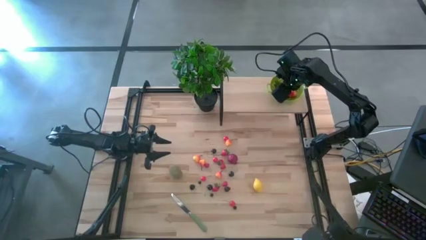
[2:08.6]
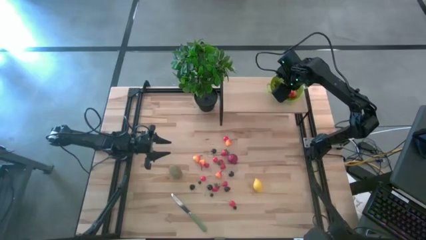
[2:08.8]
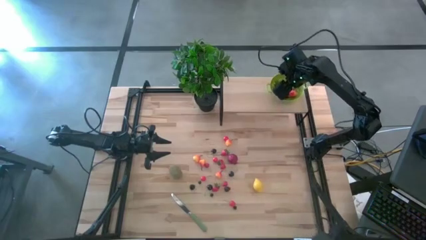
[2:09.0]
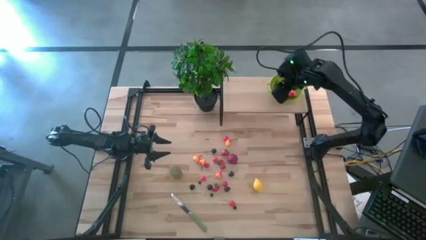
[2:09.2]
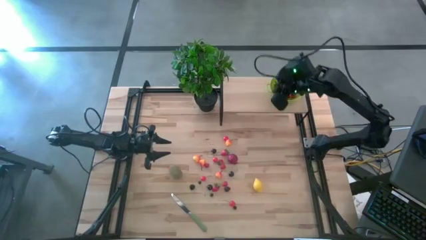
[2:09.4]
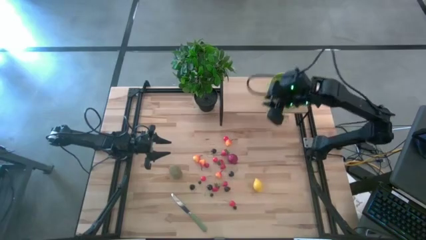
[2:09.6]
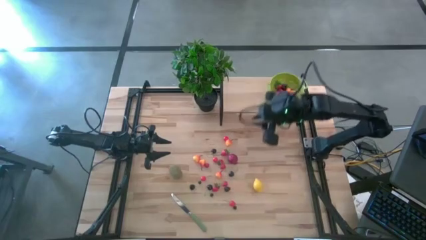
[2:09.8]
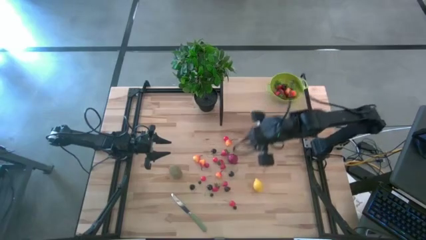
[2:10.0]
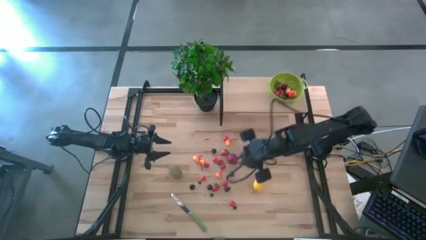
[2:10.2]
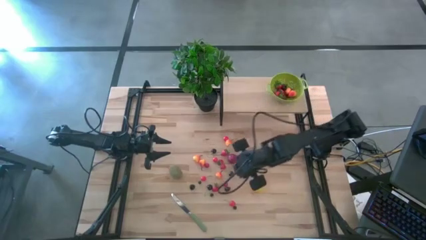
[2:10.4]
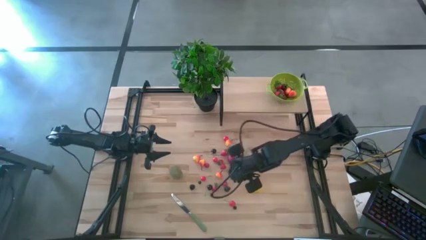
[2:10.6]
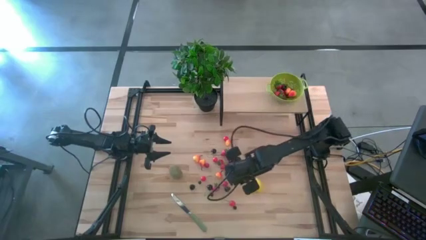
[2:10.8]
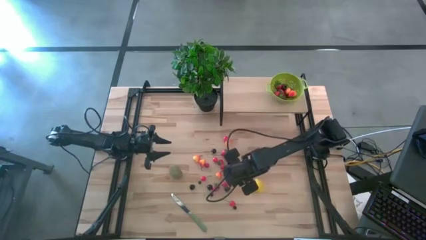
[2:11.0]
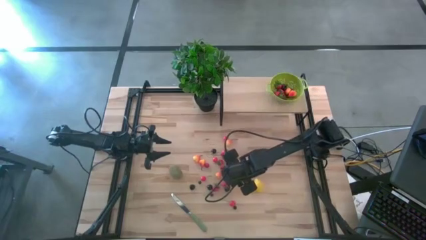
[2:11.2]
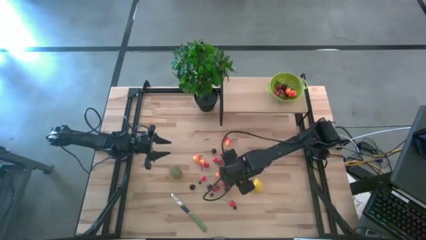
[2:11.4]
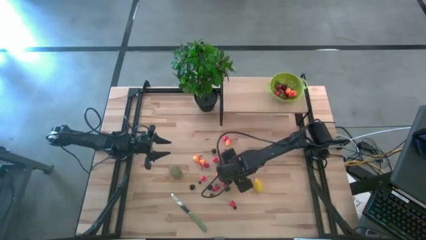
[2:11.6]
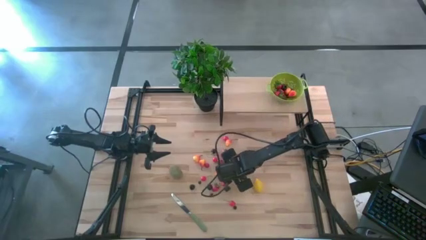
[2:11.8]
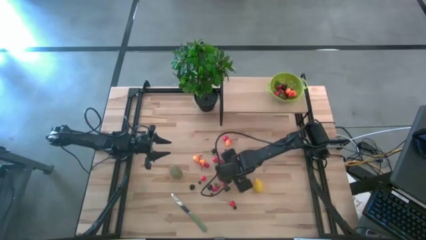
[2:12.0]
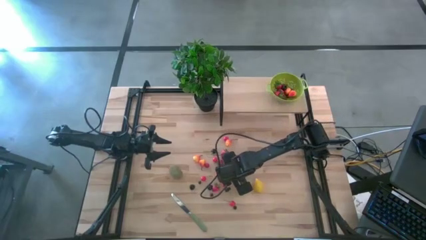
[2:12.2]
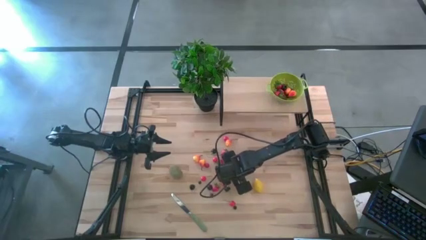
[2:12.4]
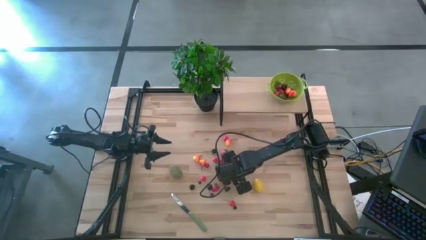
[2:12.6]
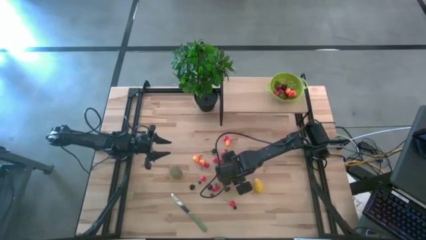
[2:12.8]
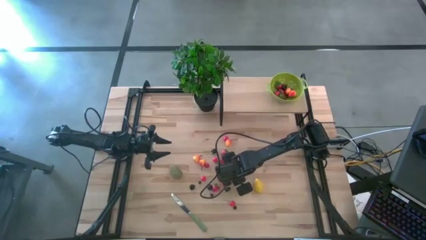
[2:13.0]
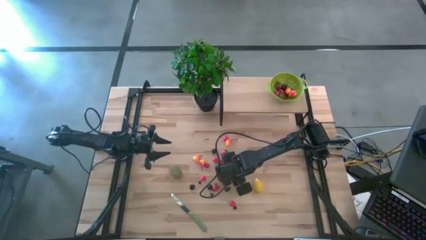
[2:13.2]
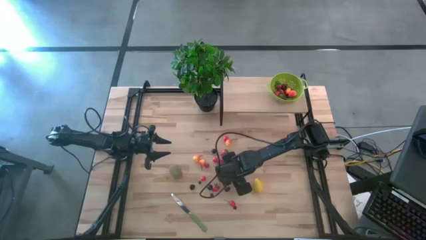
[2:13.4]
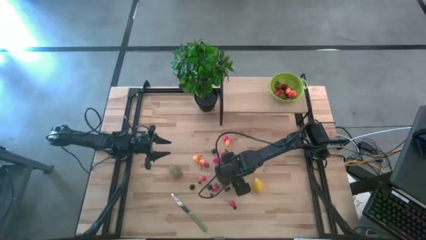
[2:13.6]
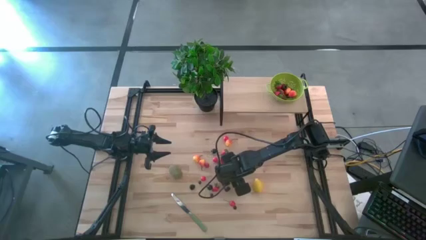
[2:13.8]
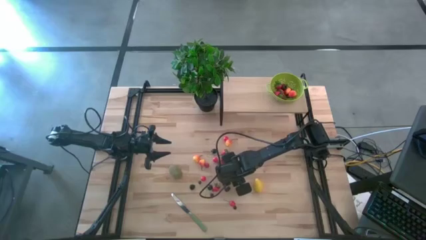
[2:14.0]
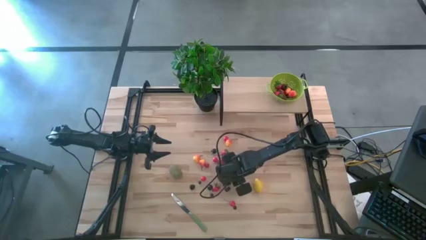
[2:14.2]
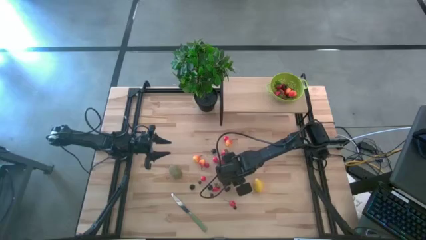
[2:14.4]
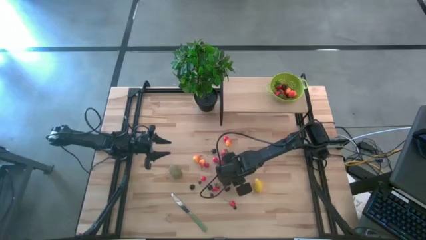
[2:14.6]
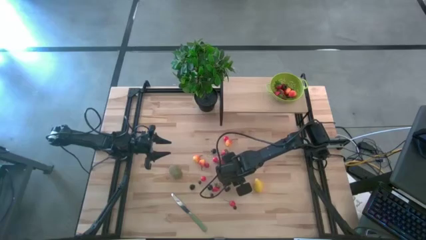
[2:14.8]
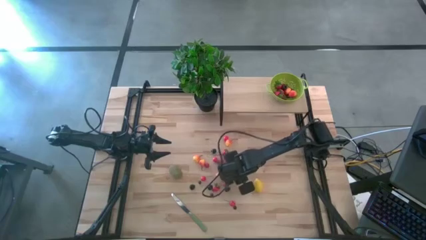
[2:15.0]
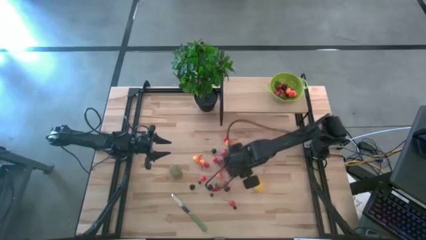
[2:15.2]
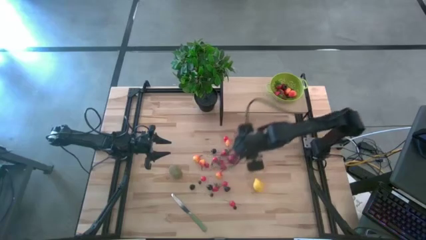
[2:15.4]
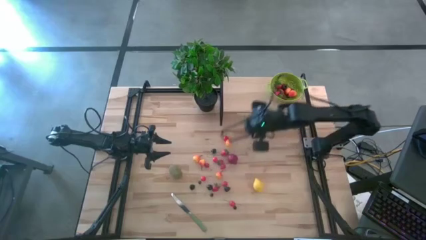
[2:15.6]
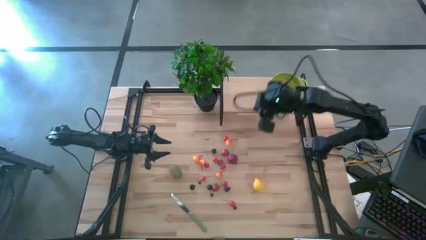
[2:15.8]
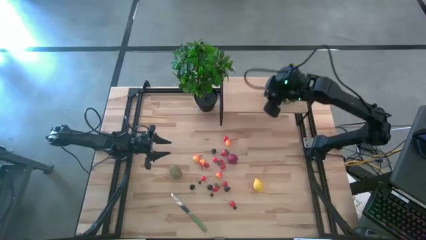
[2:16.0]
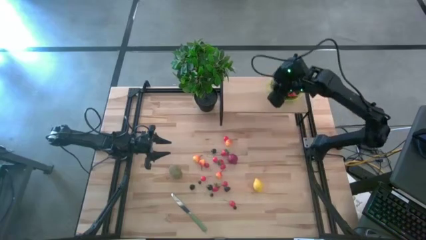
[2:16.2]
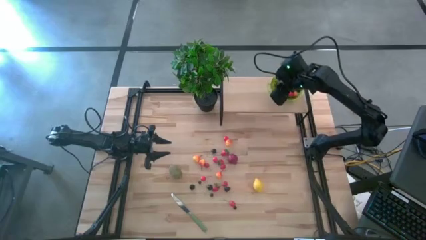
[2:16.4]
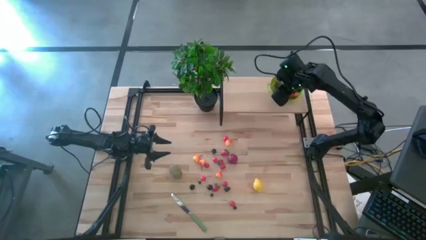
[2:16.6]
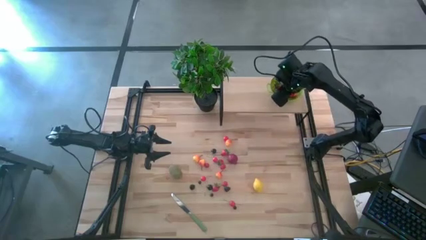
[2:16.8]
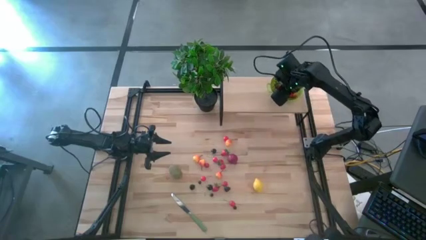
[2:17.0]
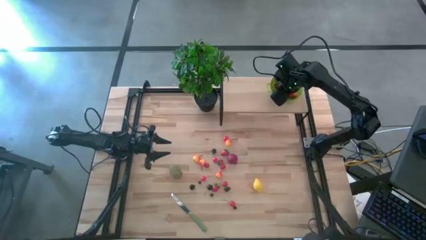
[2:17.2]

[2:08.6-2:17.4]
Task: Pick & Place Fruit
Put the black cherry into the green strainer bowl on the shelf

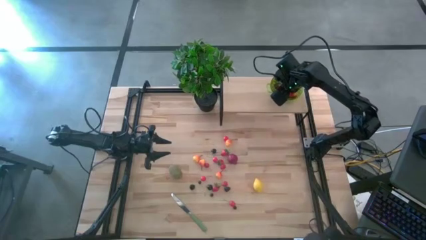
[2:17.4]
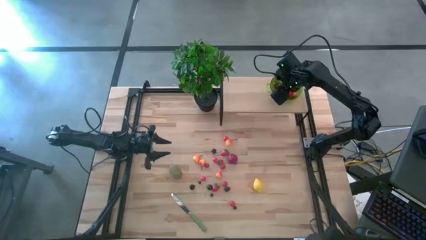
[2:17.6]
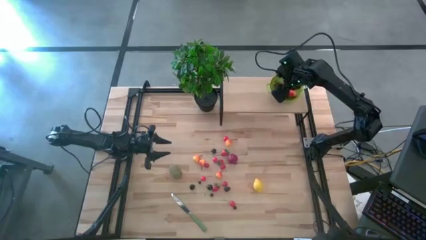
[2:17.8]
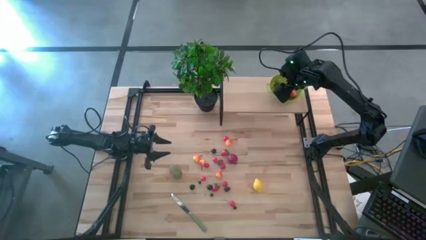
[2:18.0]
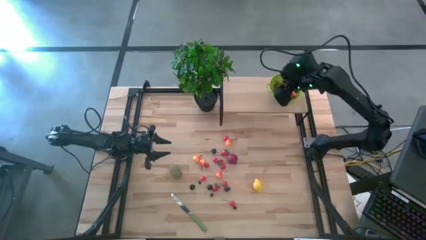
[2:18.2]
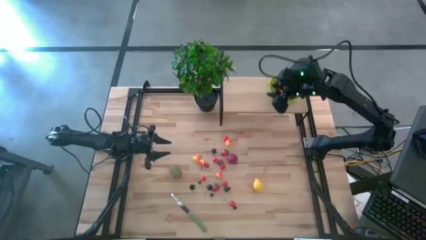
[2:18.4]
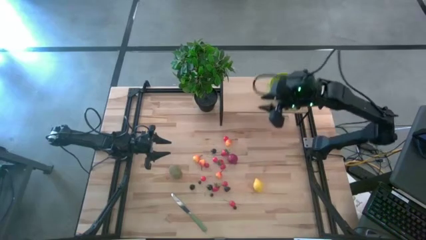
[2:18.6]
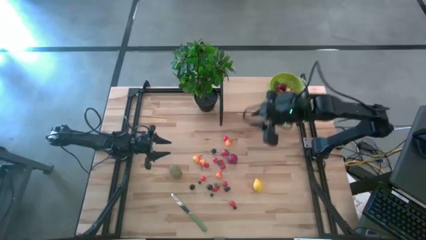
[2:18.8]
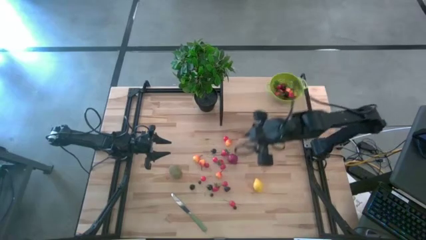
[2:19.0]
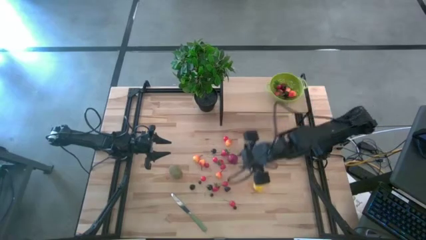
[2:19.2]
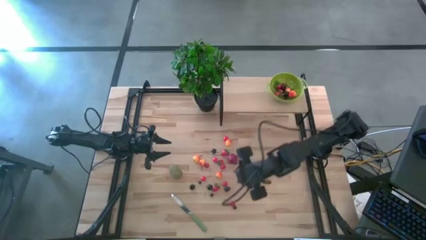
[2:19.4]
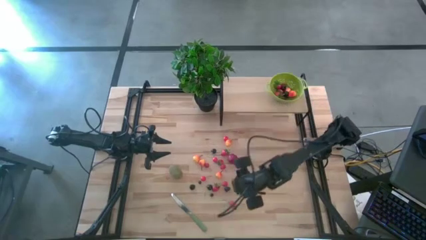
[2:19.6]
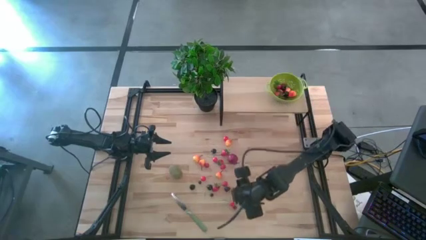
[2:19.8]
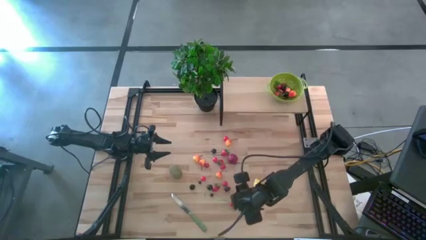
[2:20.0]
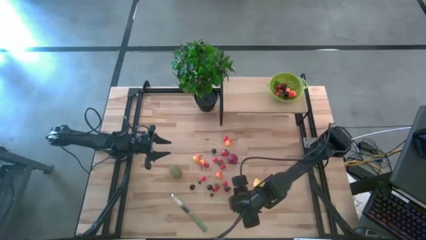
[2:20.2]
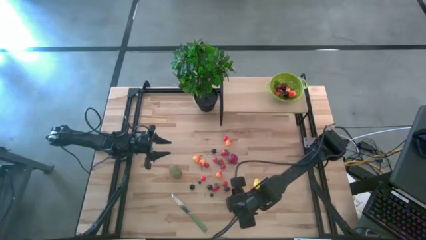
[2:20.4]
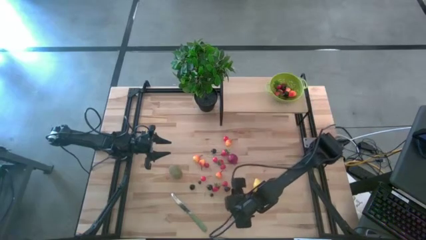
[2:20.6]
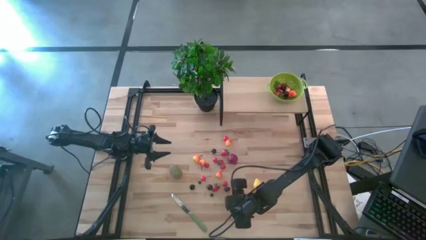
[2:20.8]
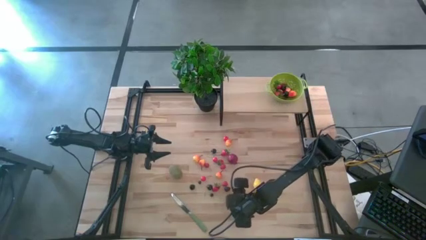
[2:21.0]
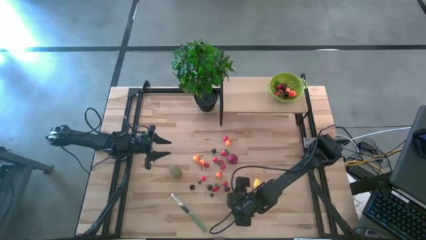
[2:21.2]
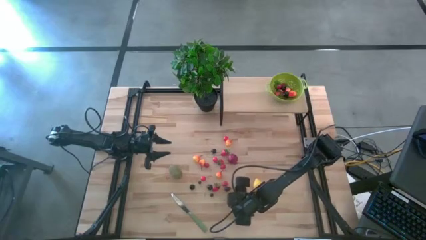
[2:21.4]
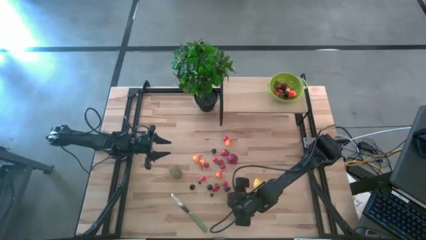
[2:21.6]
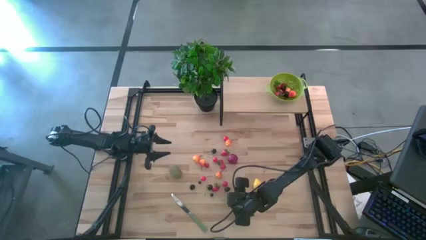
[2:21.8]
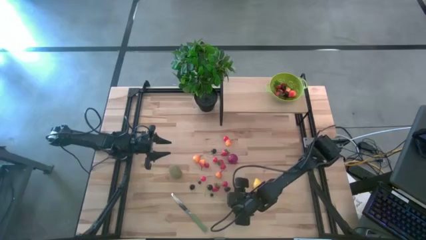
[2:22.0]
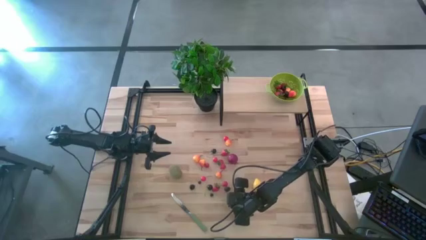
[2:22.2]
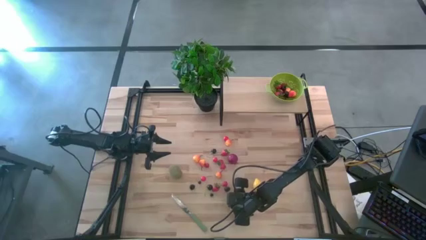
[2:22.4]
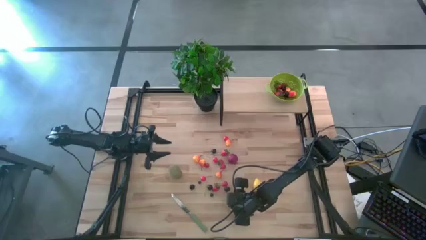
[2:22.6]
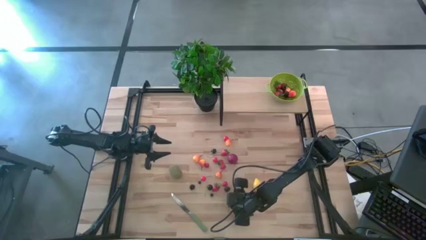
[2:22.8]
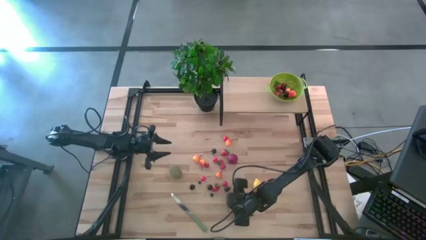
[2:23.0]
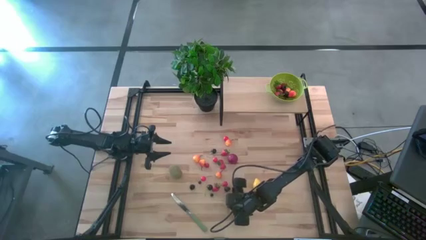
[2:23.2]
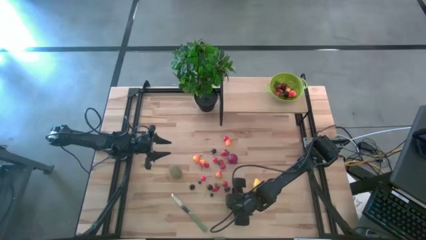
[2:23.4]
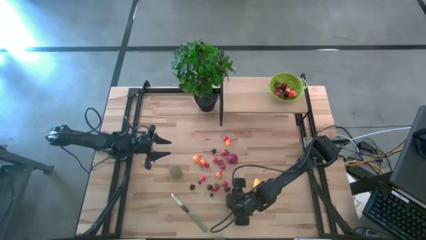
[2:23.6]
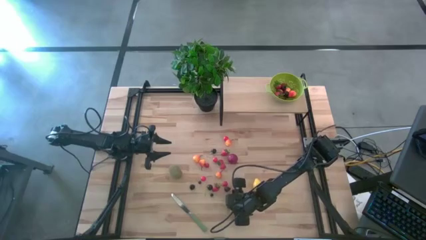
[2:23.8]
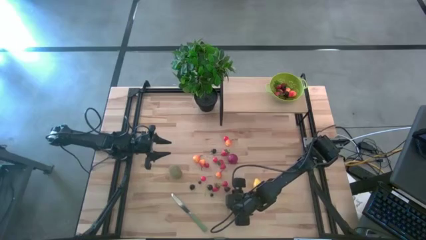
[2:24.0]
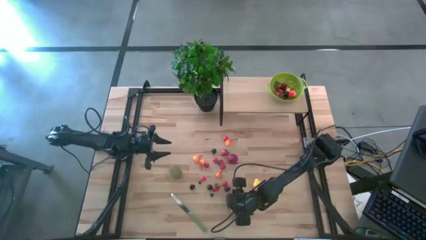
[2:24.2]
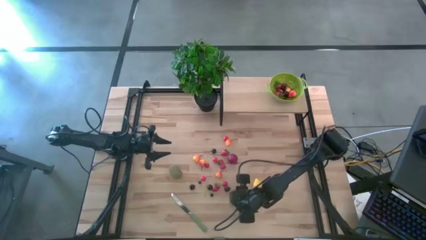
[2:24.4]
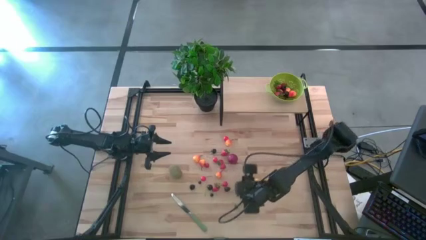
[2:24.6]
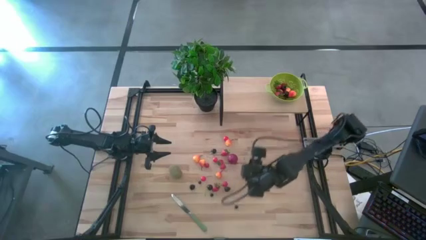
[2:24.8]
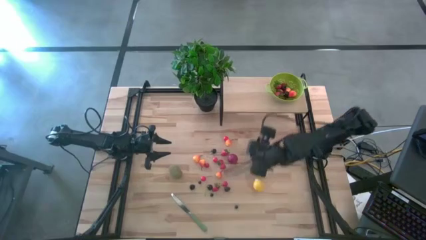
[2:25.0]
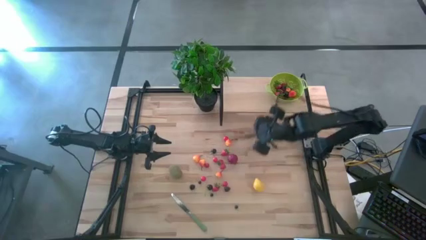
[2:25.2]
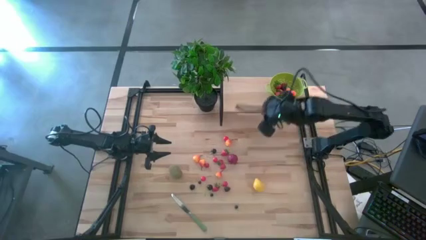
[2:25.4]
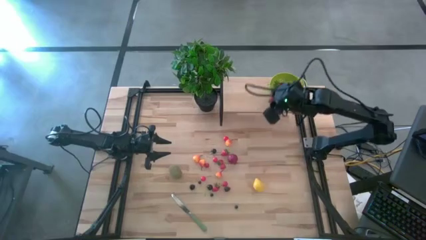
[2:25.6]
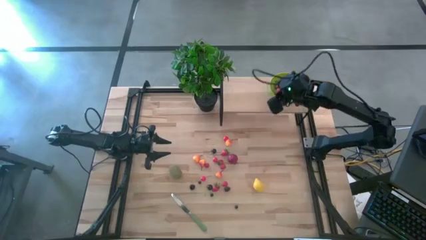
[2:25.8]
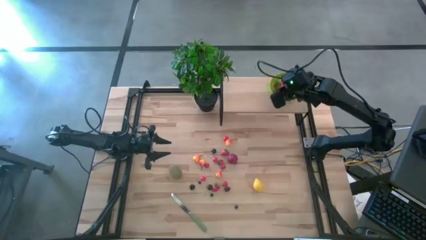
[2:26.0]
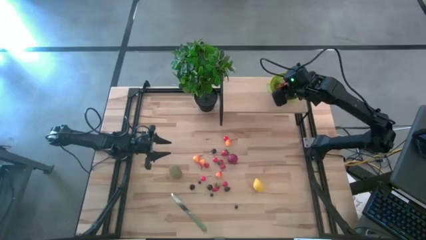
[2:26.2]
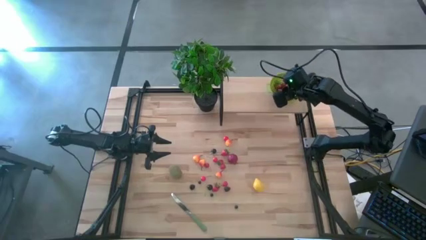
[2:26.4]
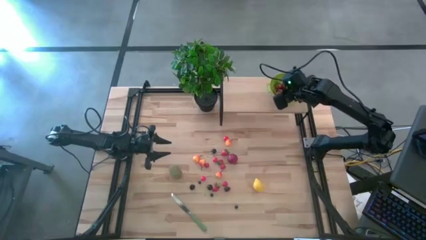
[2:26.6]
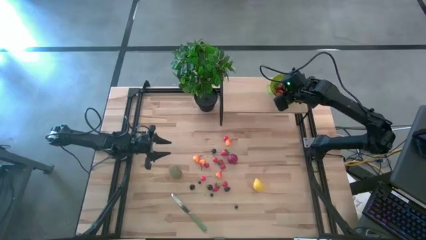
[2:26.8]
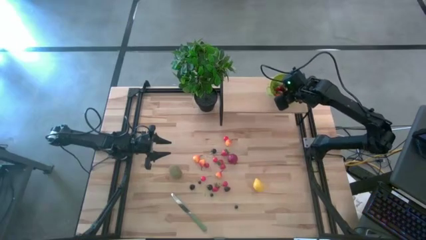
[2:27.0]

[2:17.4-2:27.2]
Put the red cherry into the green strainer bowl on the shelf
